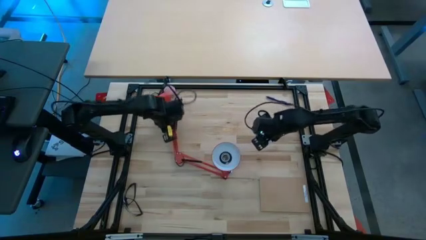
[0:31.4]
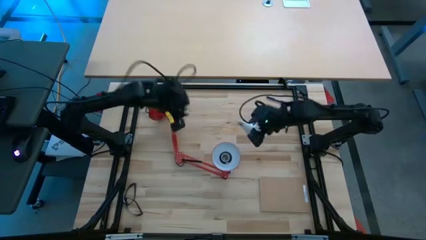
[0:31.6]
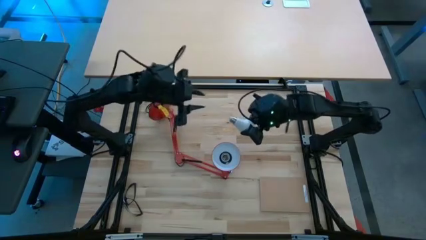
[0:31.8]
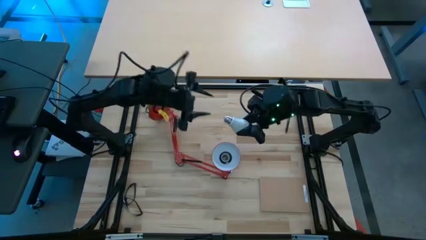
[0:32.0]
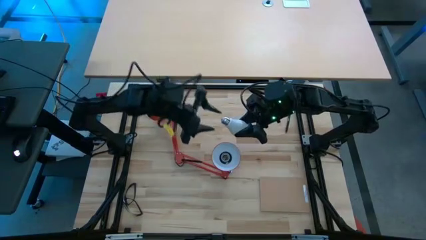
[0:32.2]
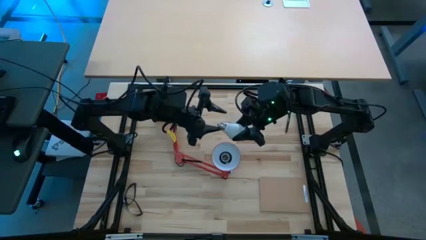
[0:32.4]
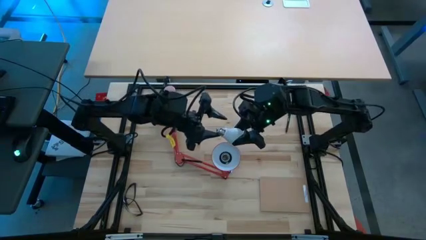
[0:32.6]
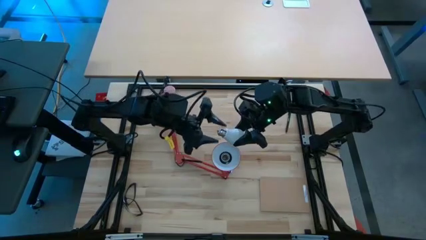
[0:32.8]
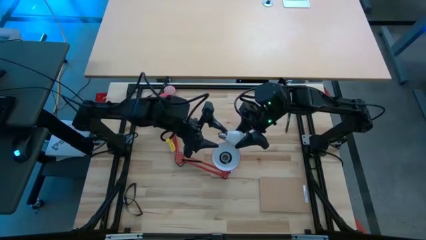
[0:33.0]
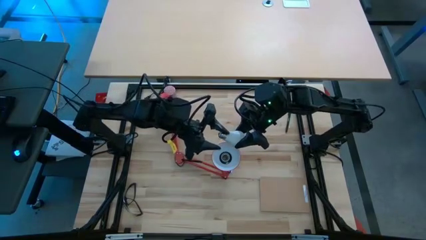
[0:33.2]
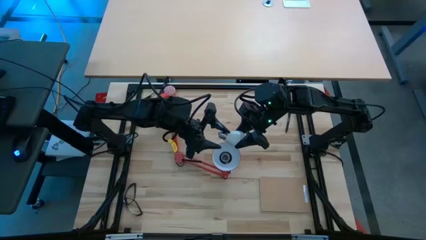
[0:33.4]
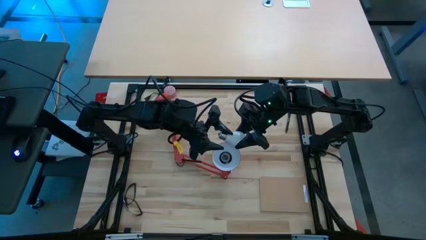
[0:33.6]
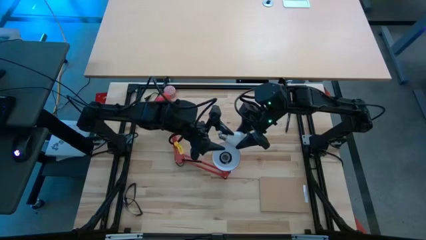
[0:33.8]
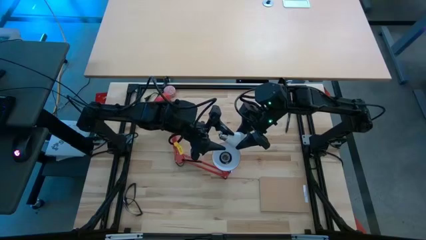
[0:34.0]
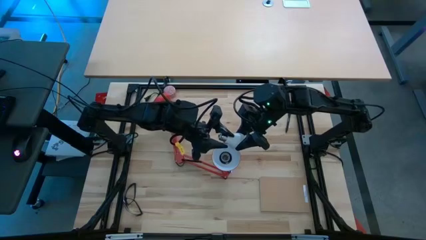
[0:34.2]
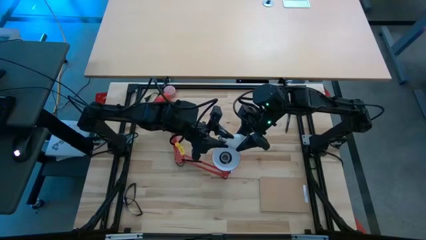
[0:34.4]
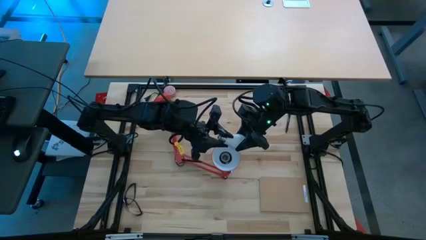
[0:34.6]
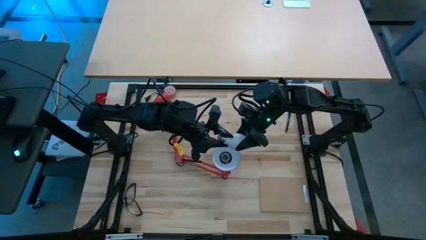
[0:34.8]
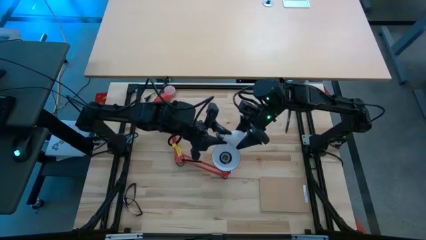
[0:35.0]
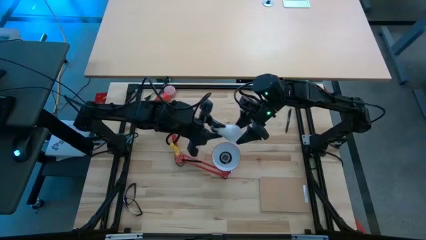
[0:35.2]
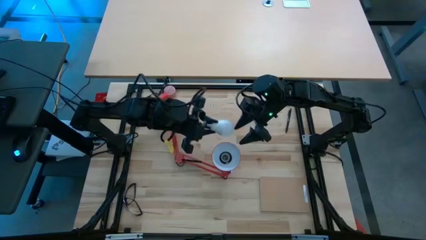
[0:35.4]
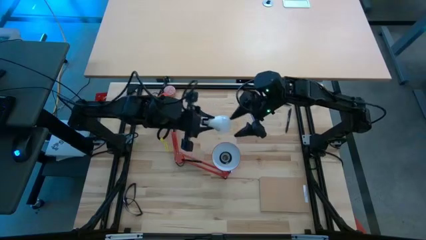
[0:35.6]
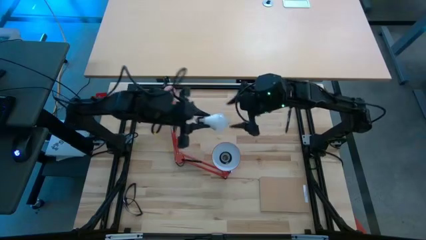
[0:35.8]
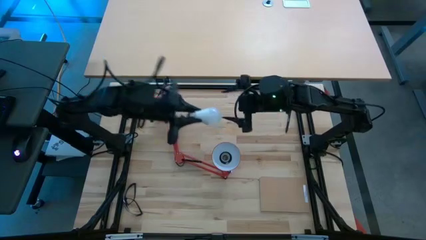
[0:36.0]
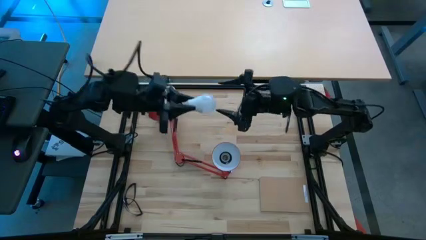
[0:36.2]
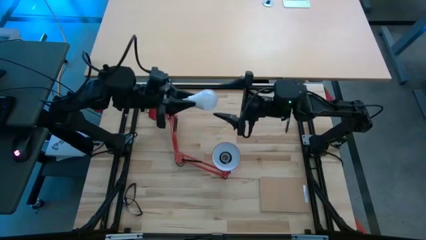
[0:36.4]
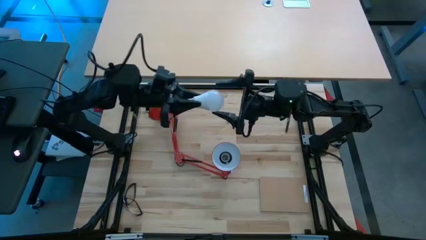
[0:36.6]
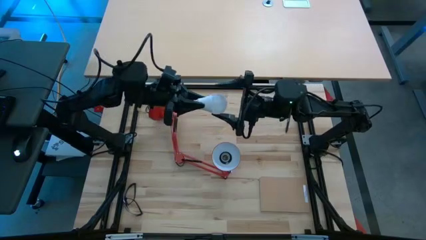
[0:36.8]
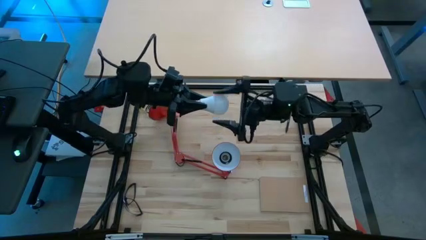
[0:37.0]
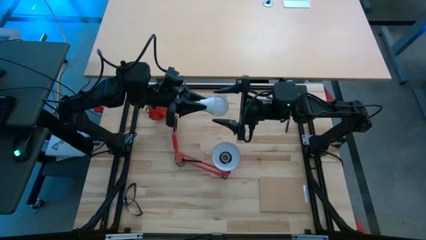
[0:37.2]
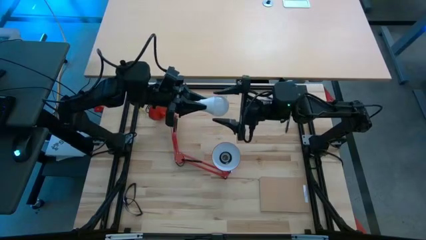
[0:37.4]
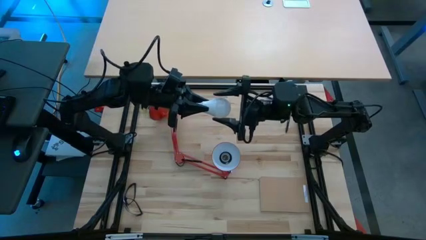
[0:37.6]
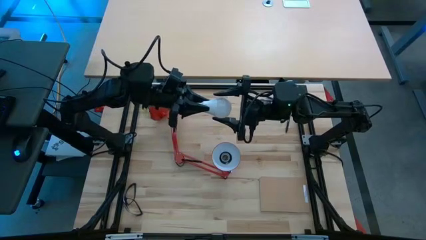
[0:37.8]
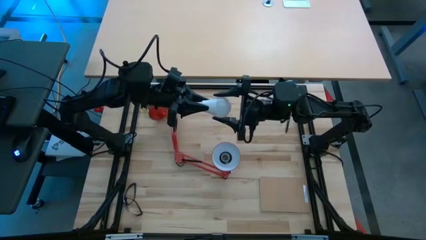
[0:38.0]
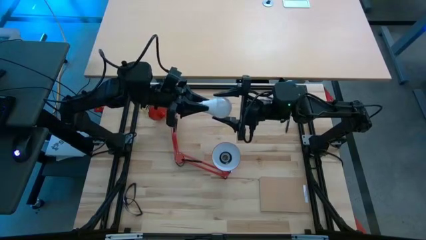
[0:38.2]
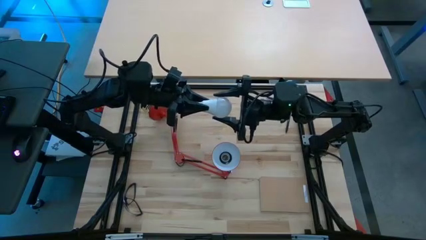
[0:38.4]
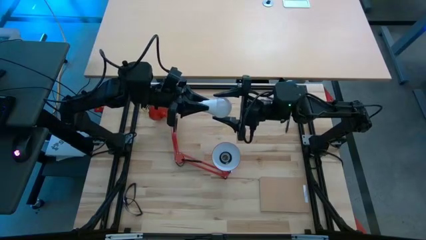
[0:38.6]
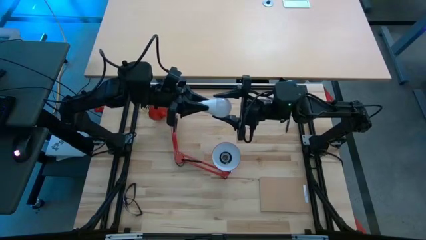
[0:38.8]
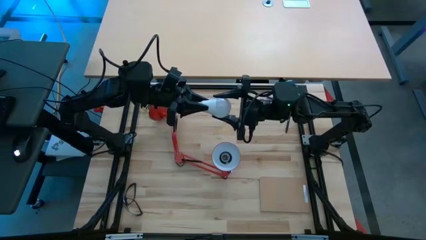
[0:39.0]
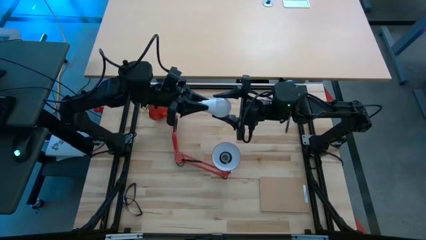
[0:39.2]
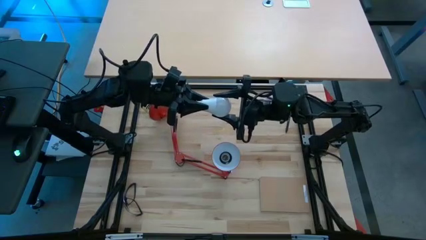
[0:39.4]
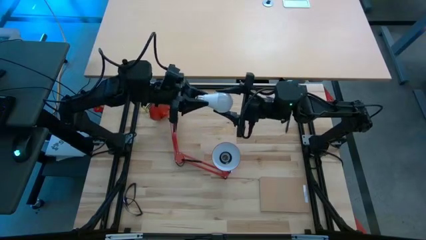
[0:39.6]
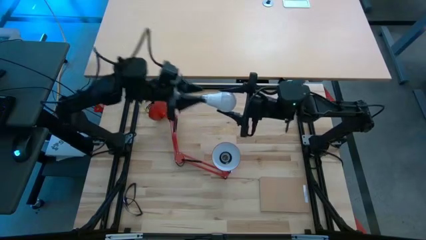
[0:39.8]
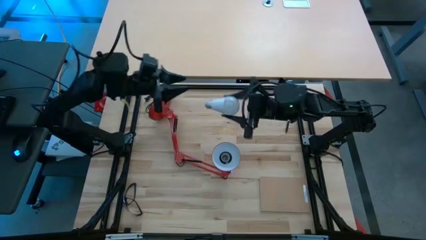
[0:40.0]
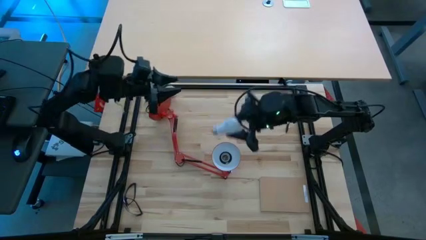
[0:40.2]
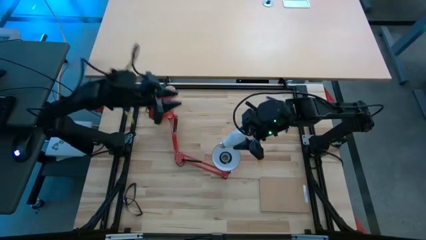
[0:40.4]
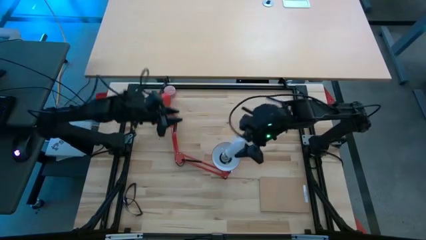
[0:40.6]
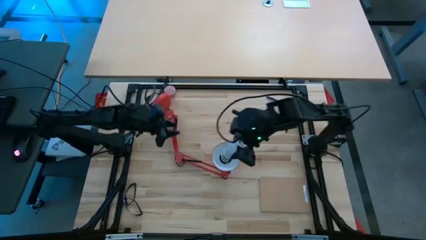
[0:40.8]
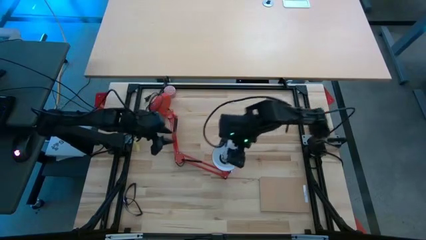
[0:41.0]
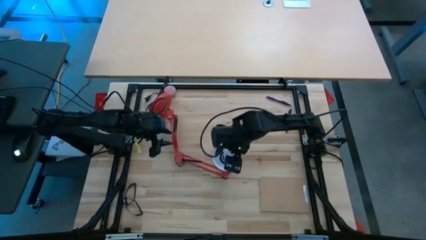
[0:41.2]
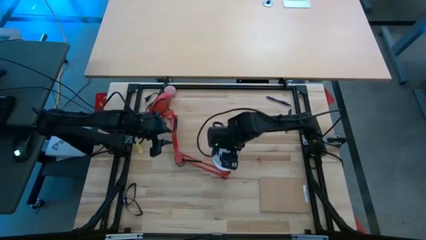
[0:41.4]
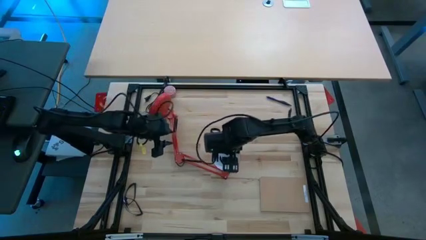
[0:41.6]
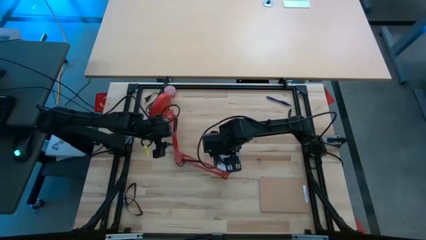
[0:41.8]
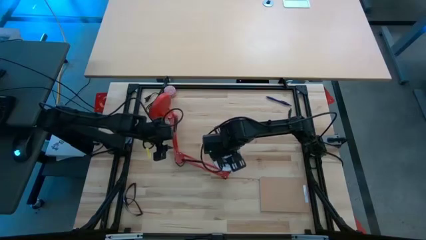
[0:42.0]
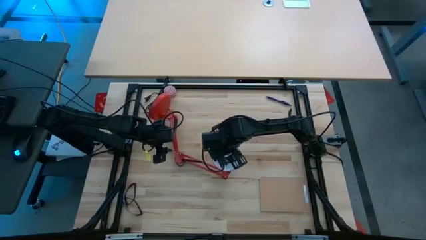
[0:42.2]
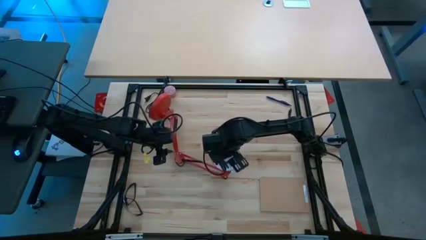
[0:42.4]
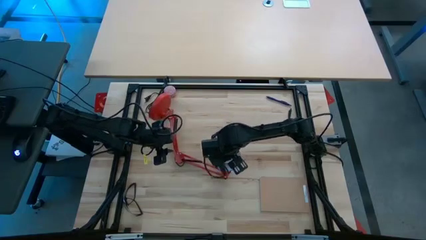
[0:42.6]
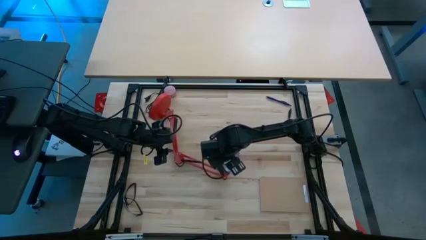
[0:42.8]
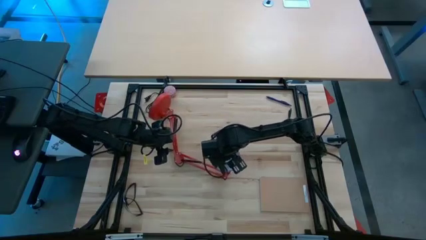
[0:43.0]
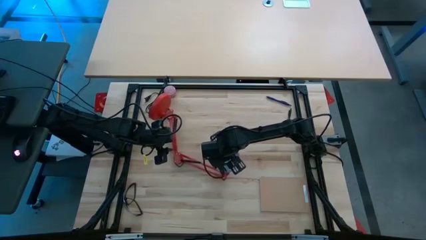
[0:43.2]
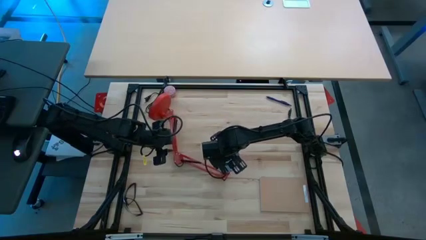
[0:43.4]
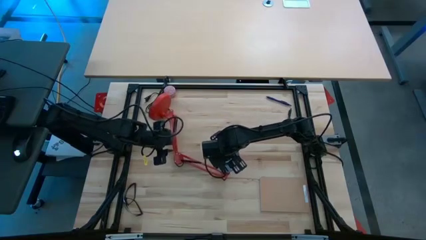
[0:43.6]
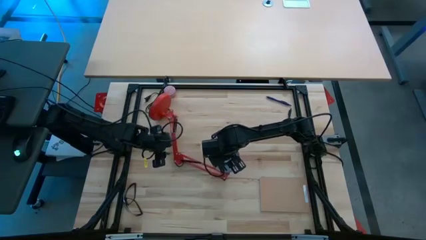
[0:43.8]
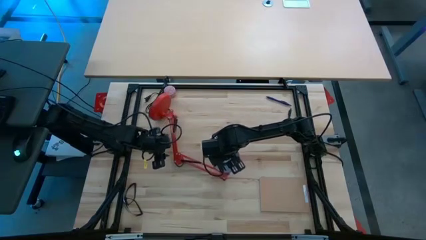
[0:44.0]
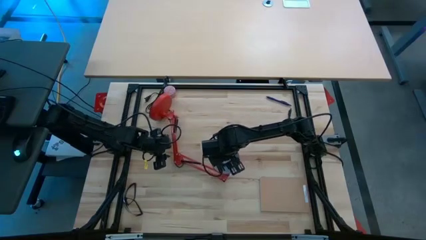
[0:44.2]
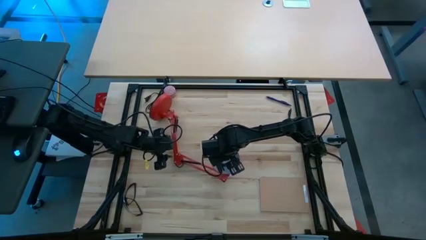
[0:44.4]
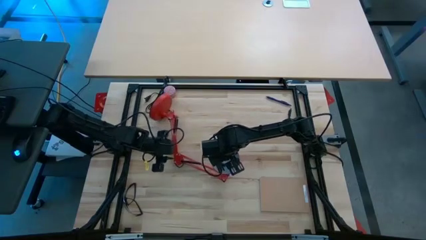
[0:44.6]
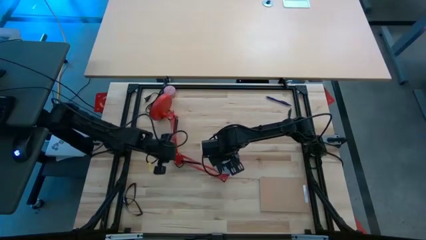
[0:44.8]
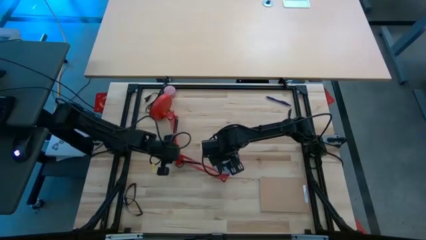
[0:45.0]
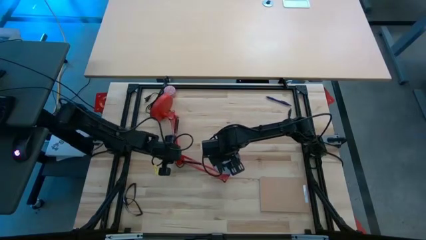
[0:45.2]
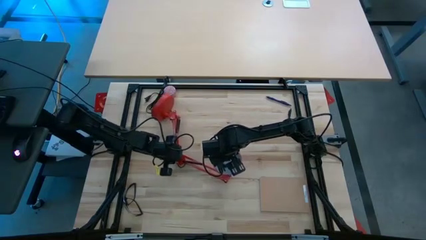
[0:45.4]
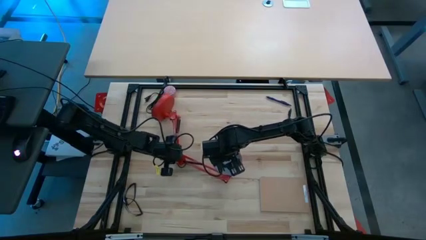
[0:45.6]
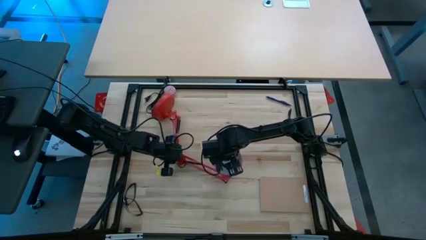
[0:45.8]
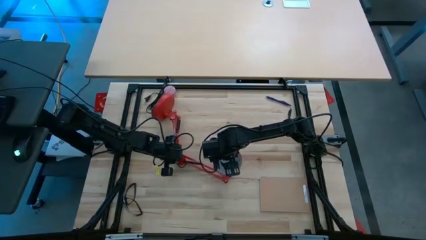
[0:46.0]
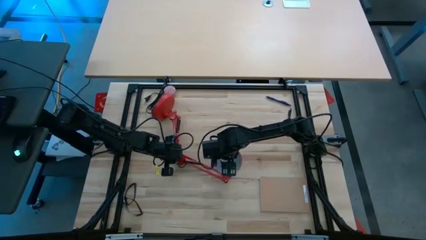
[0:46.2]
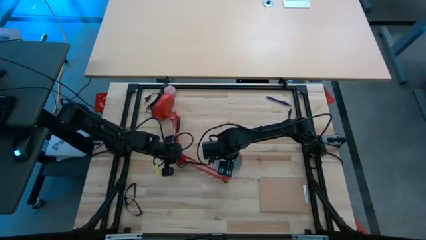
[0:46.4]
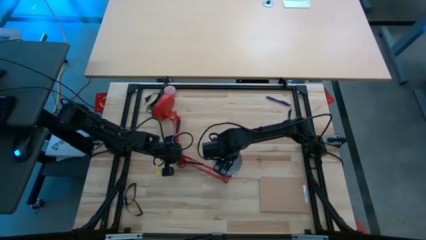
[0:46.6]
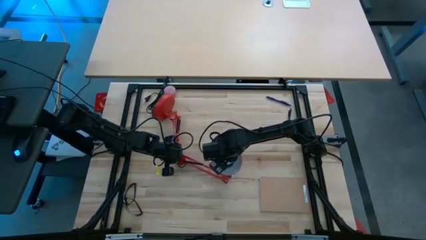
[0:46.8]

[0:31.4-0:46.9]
Task: Screw lightbulb
Insert the lightbulb into the desk lamp
